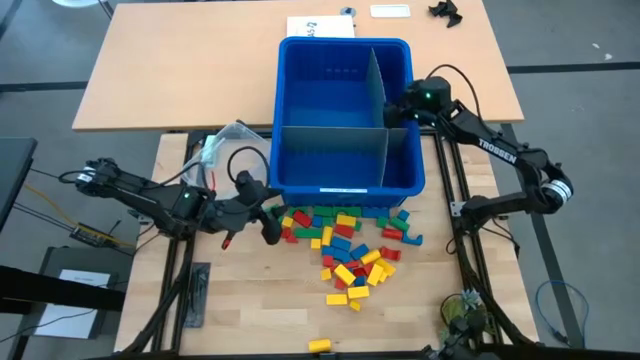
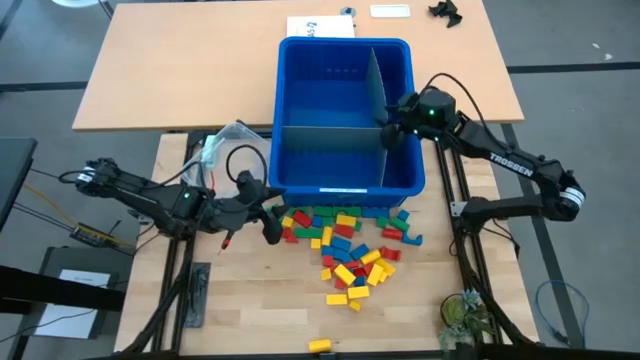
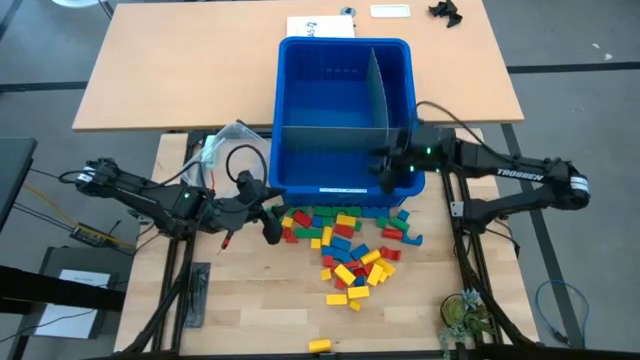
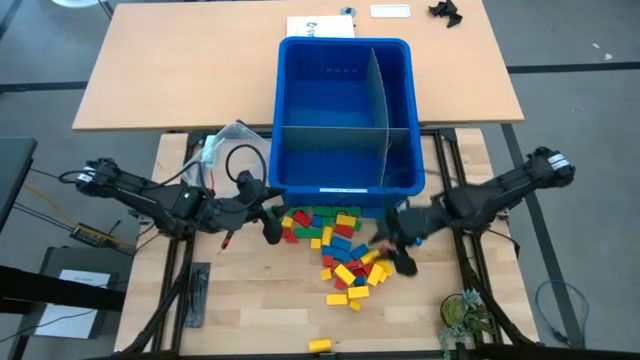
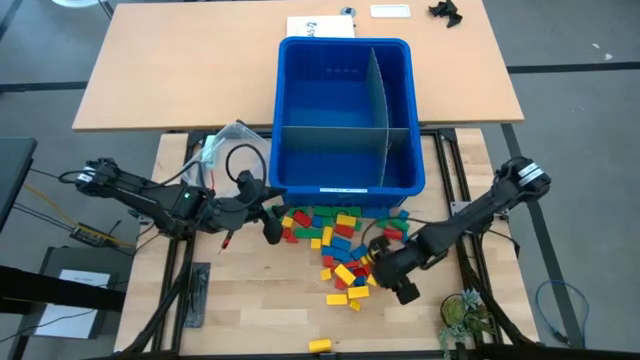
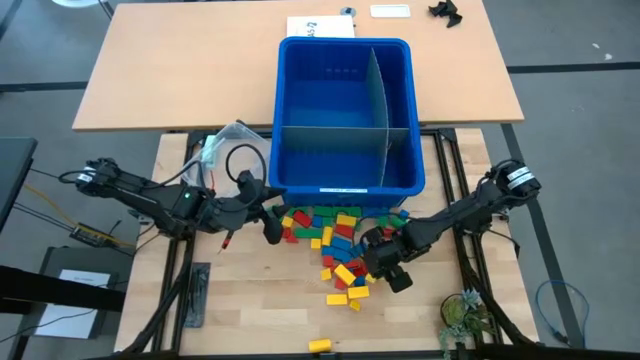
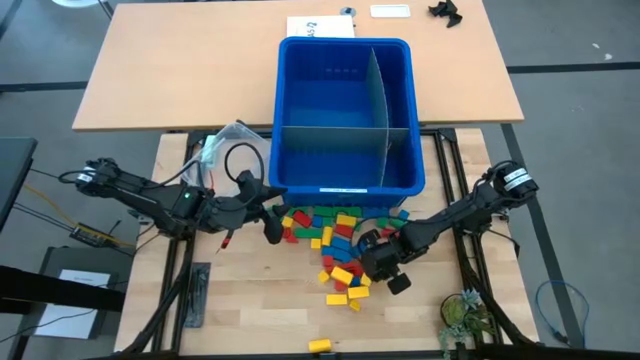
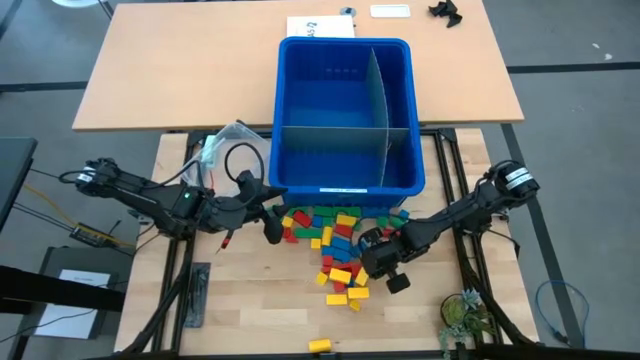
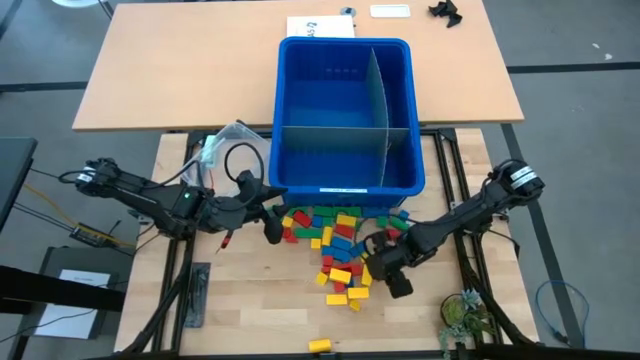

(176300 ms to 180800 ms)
Task: Sort blocks
Put the yellow block into the blue bin

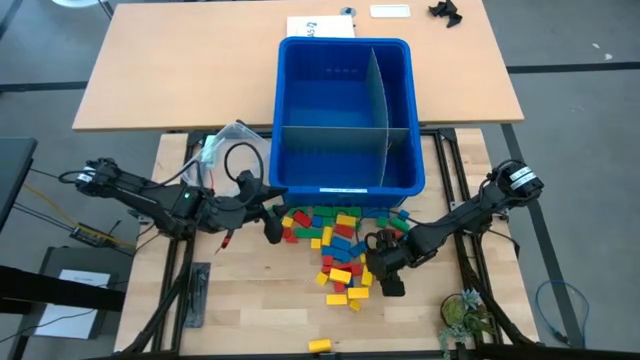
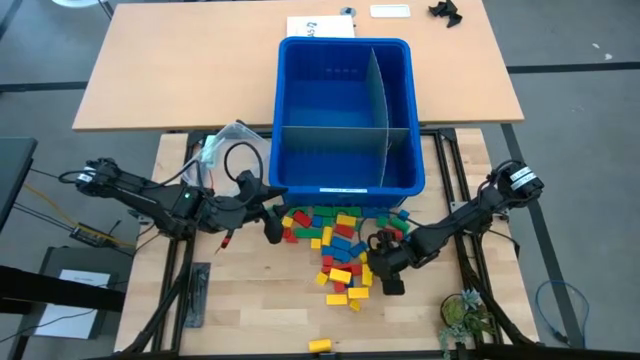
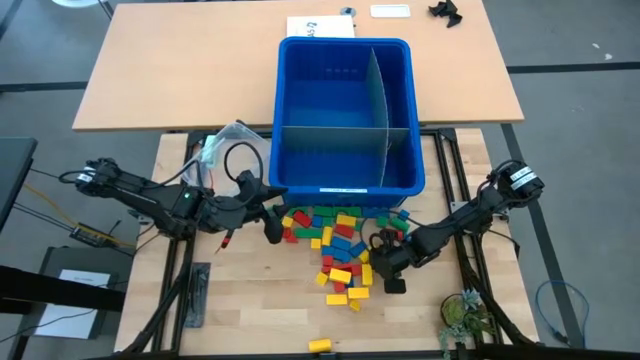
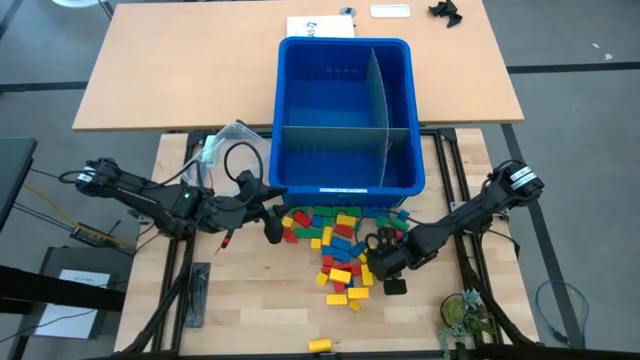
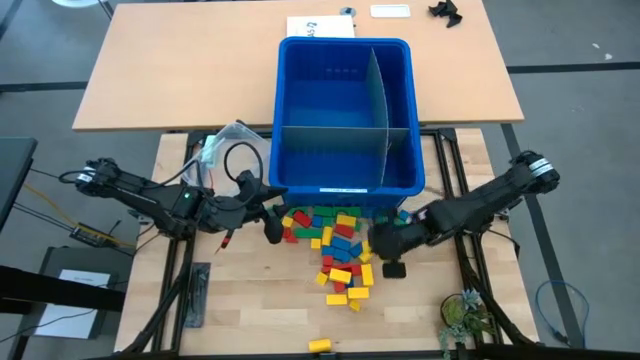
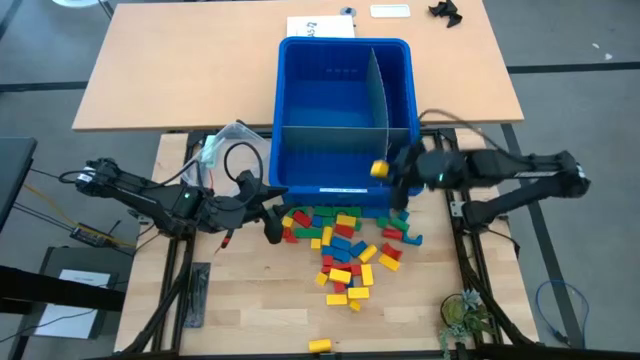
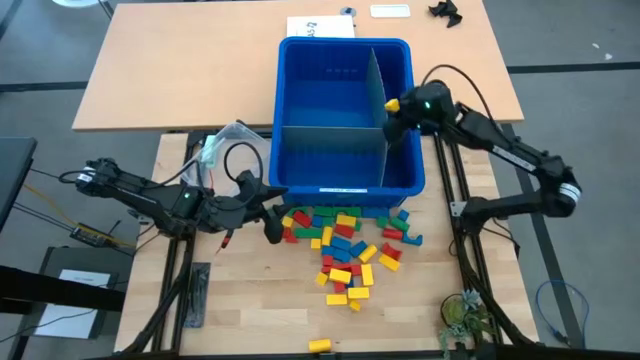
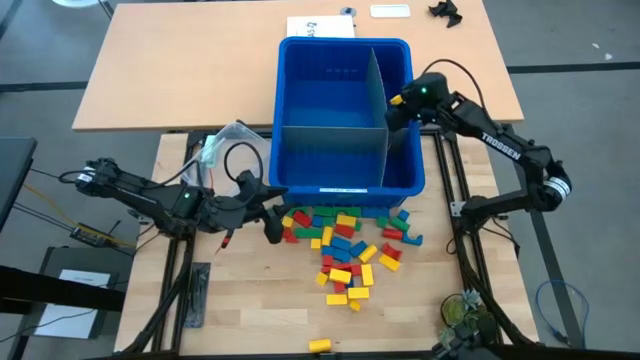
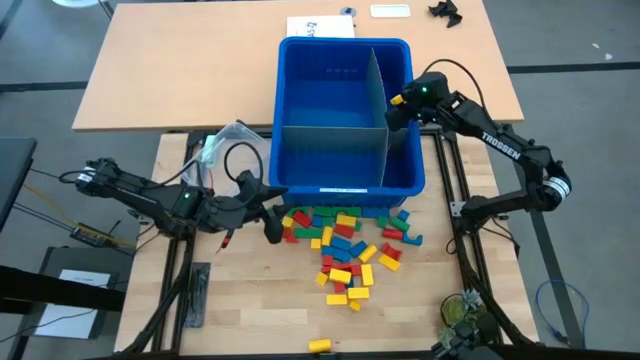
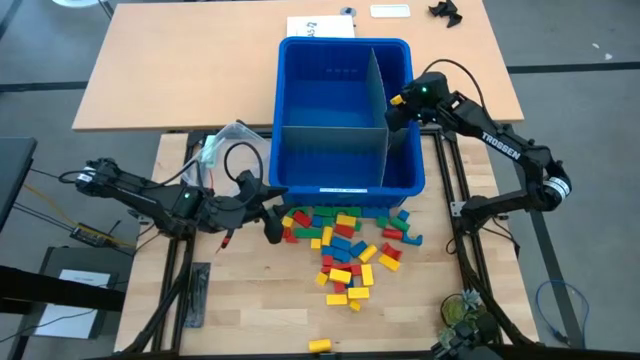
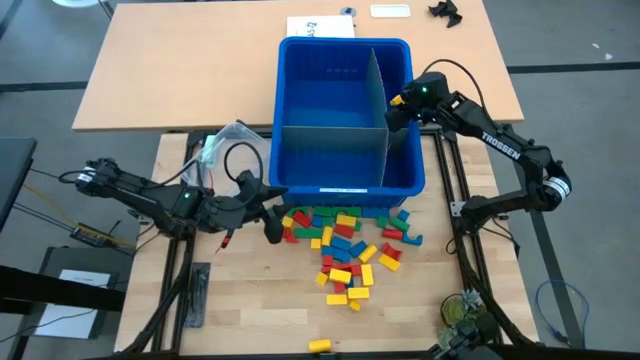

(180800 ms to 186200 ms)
Put the yellow block into the blue bin

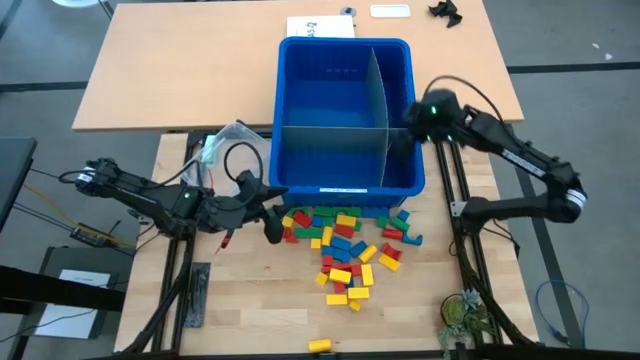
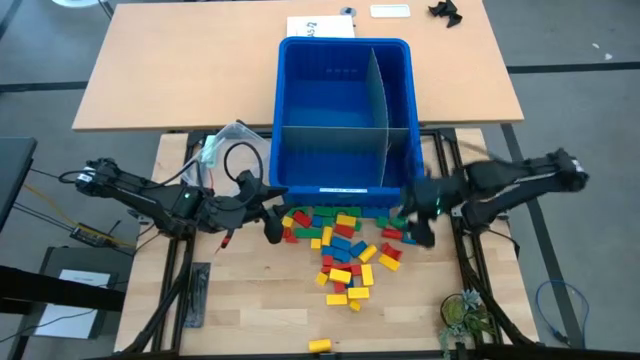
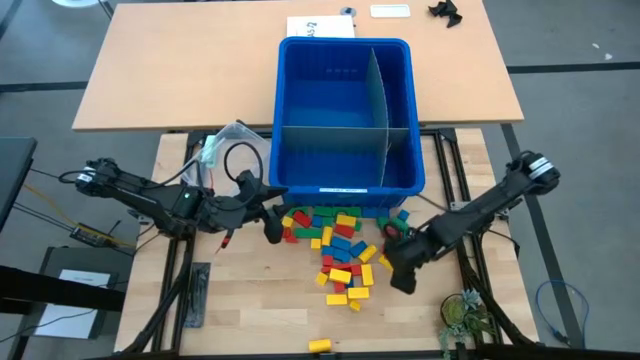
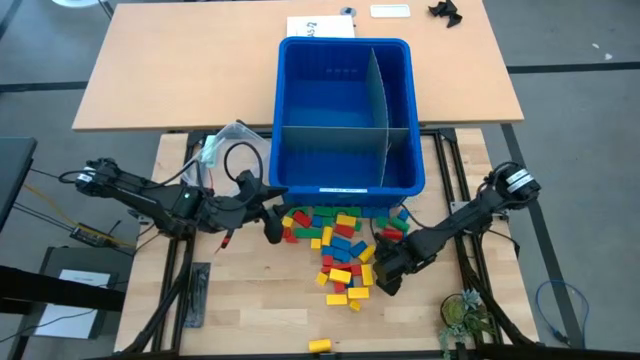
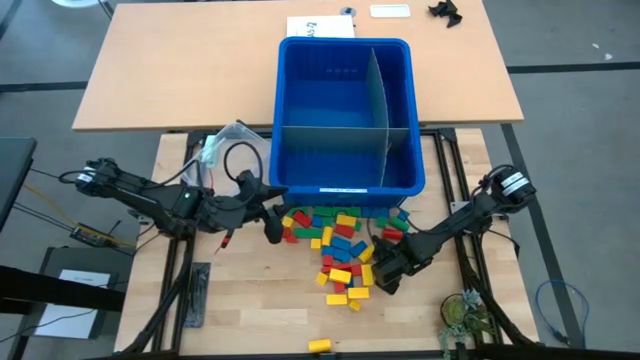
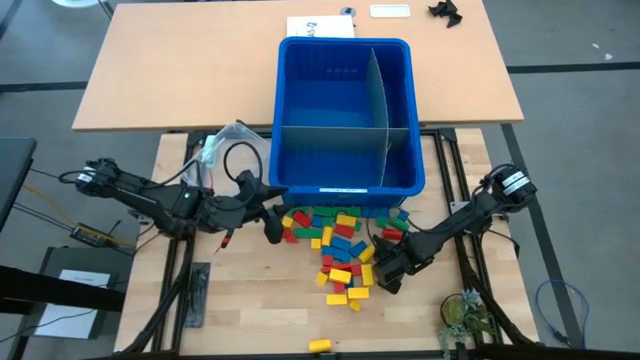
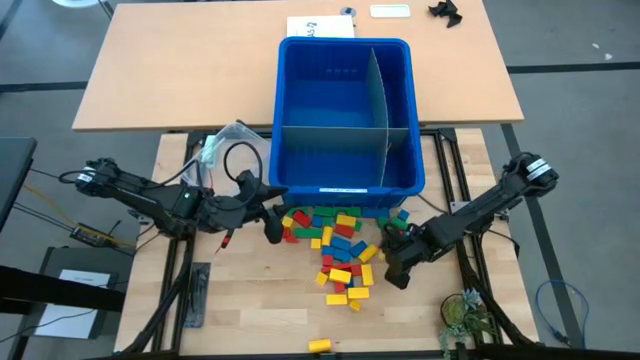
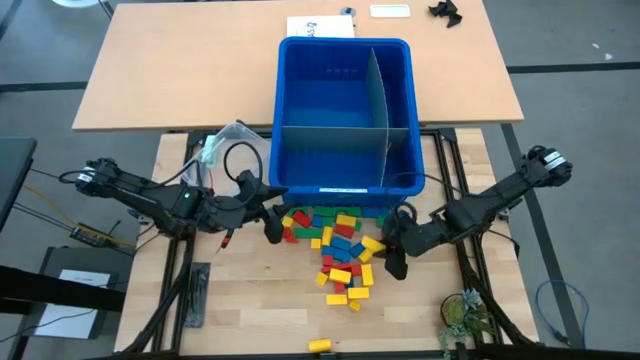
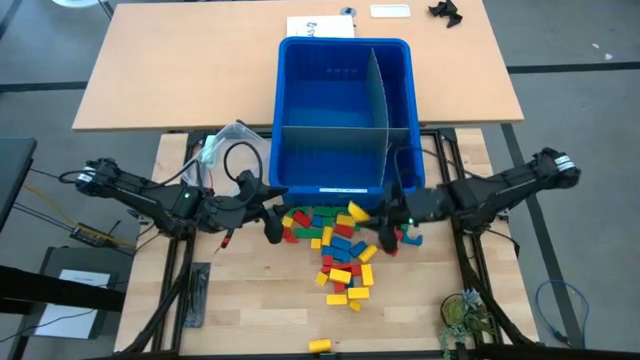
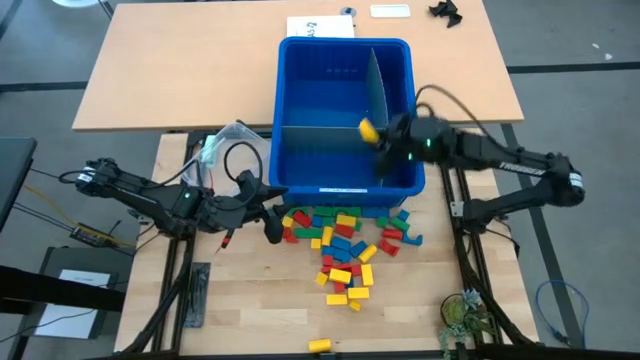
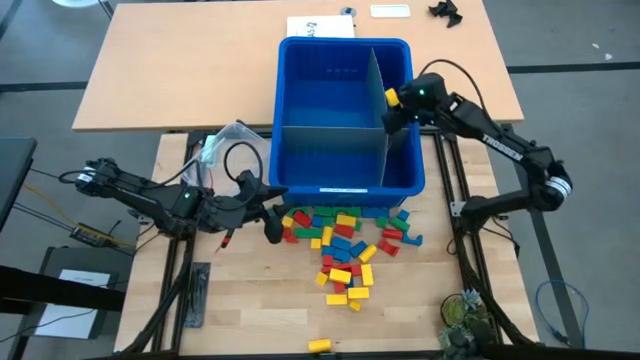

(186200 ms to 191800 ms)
Put the yellow block into the blue bin

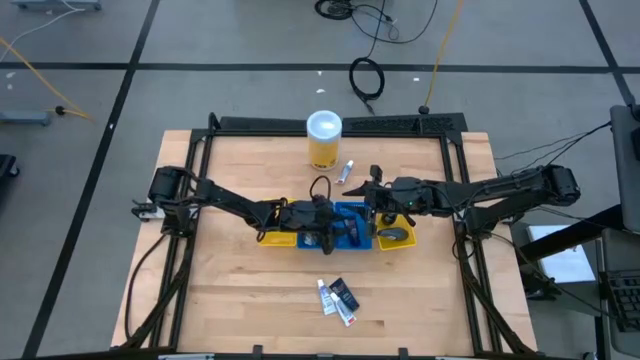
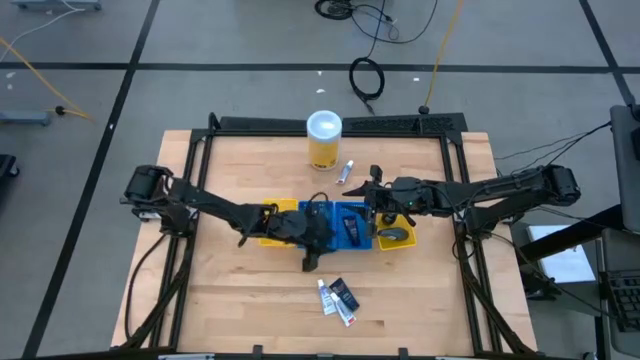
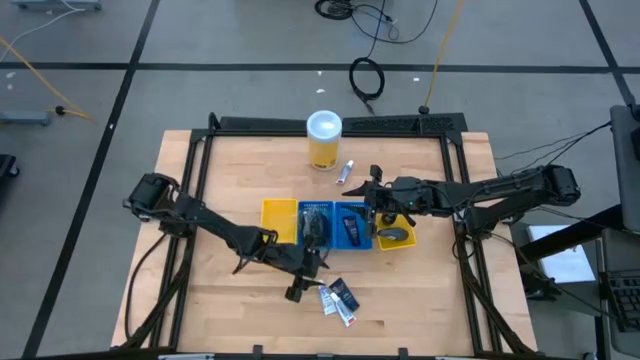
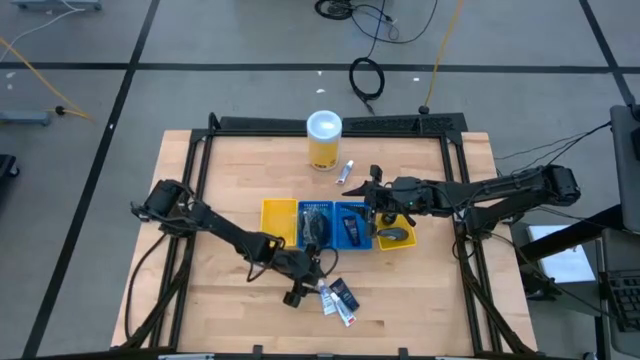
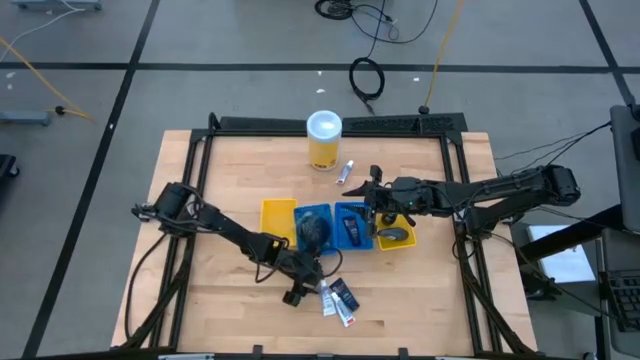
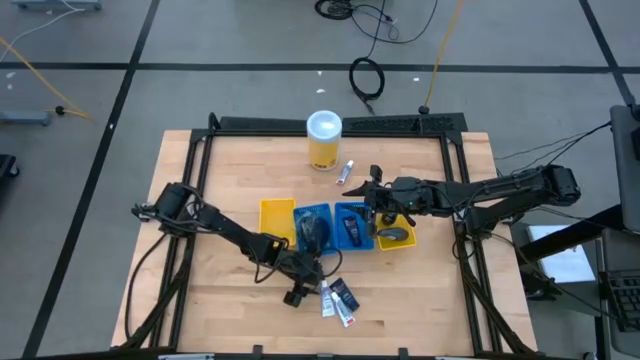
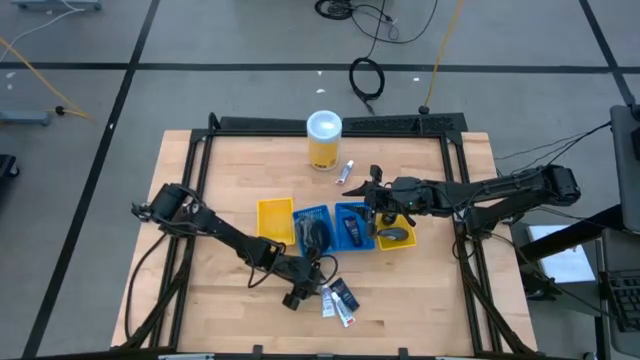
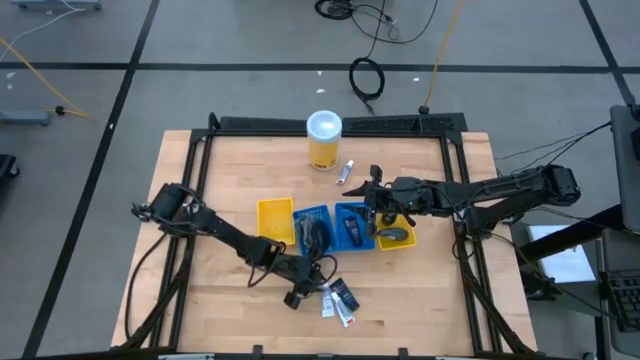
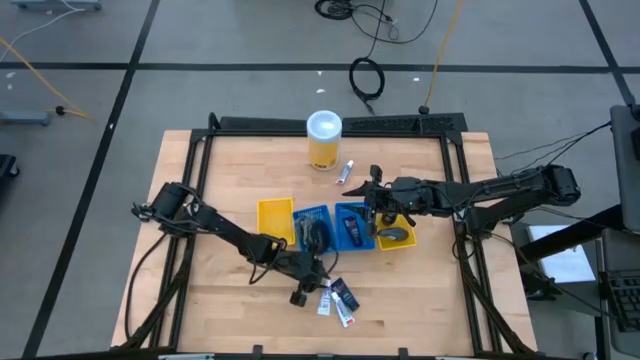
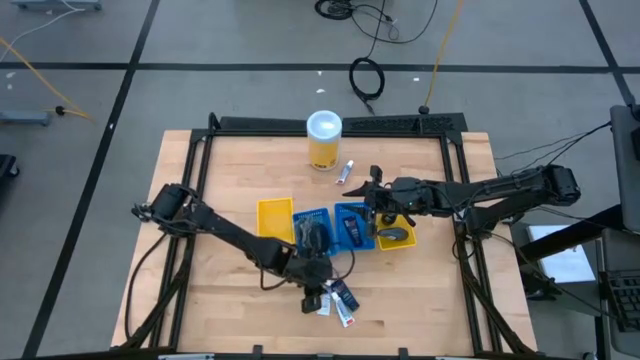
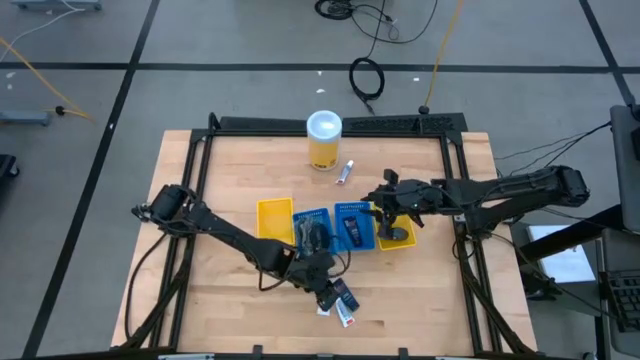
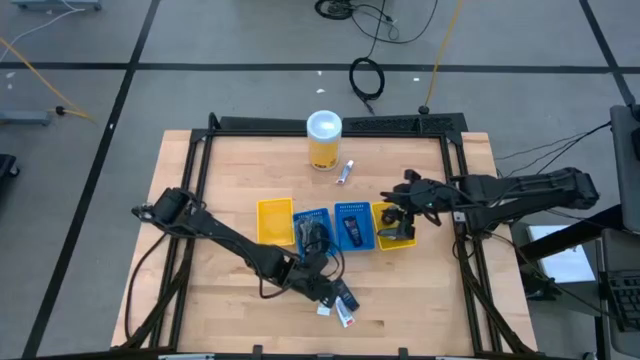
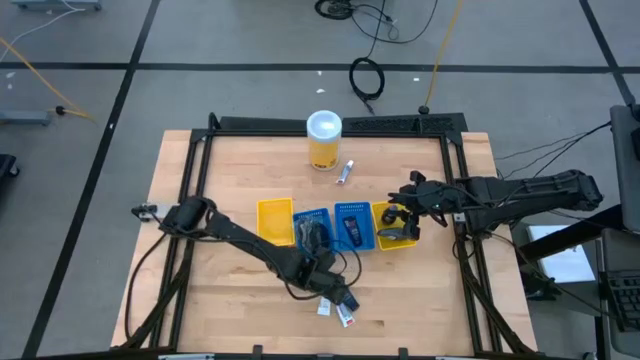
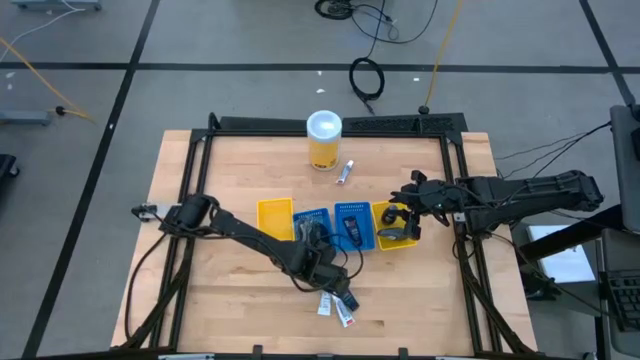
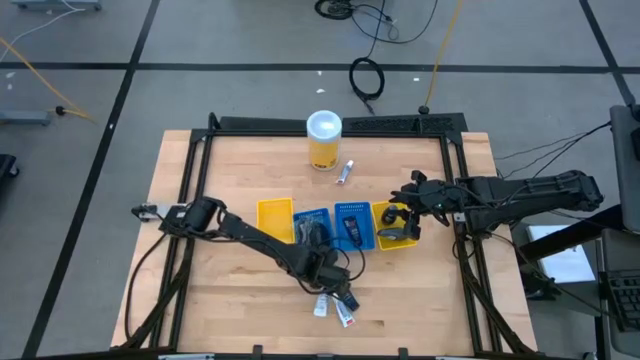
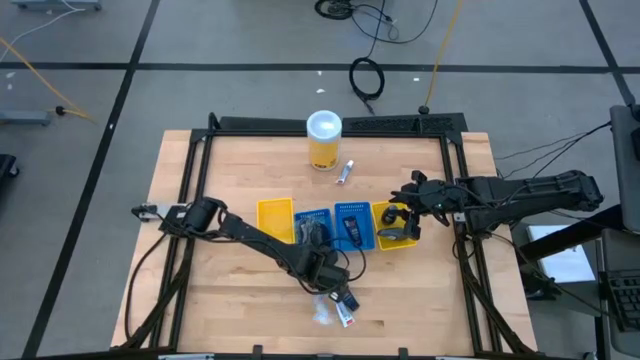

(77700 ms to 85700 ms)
Task: Pick & Place Travel size toiletries
Put the white toothpaste into the left yellow bin
